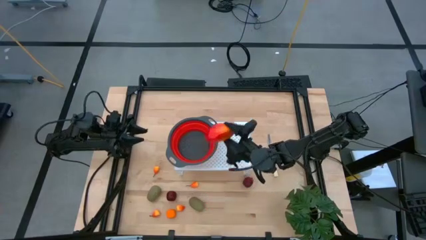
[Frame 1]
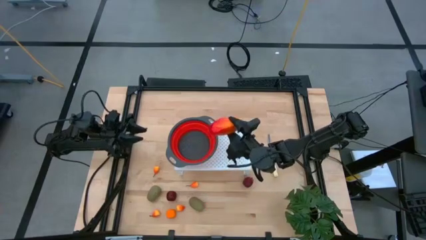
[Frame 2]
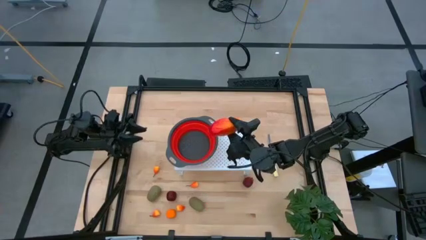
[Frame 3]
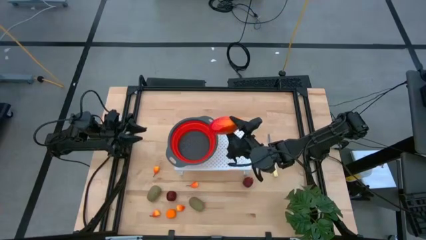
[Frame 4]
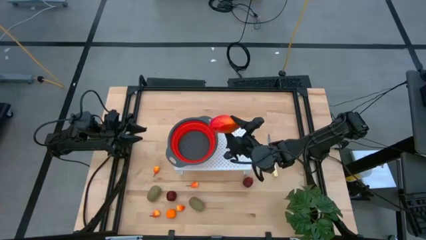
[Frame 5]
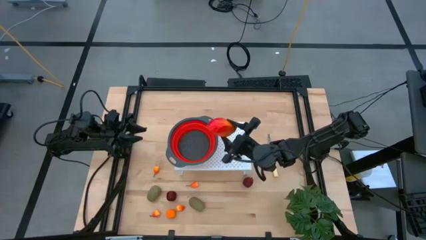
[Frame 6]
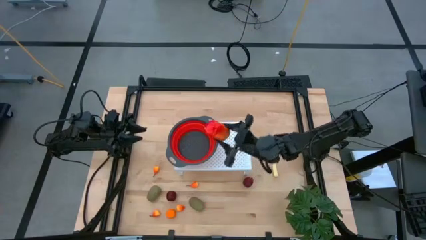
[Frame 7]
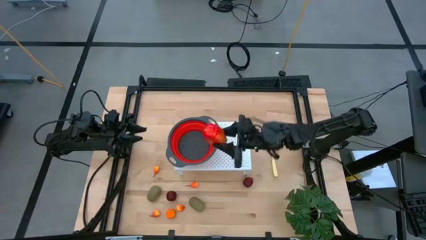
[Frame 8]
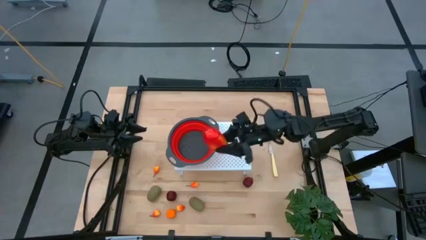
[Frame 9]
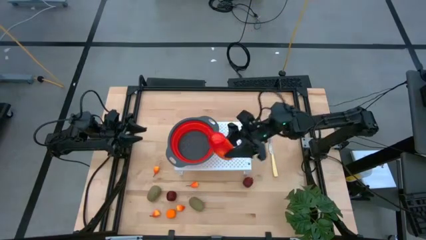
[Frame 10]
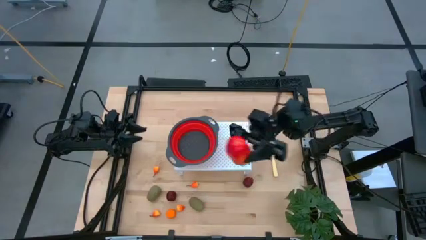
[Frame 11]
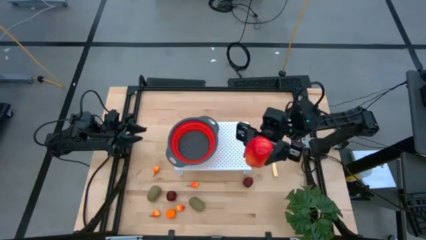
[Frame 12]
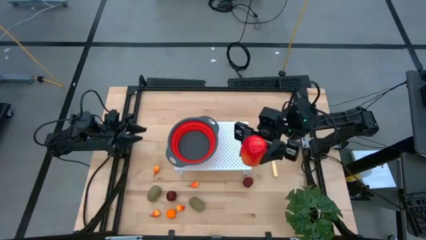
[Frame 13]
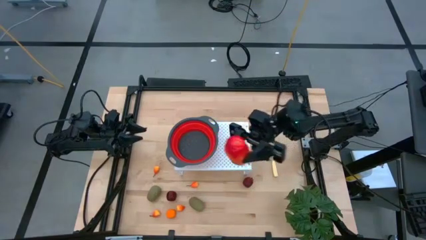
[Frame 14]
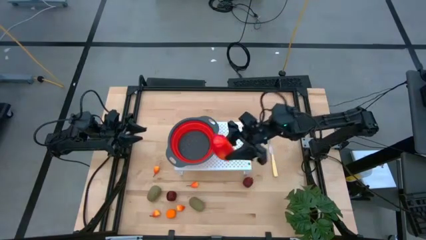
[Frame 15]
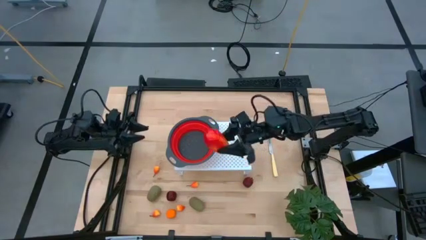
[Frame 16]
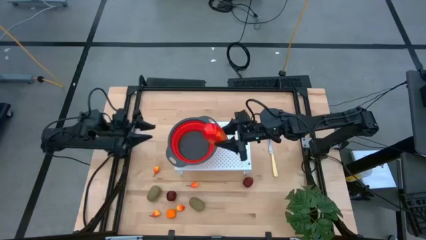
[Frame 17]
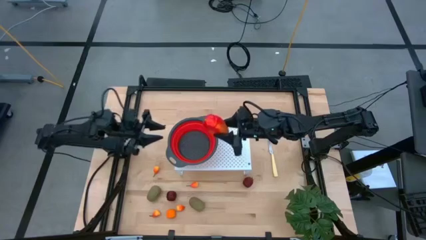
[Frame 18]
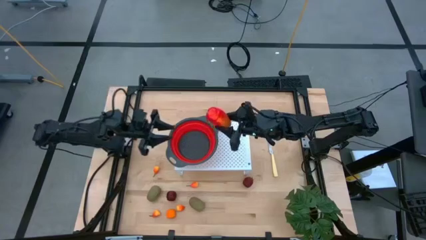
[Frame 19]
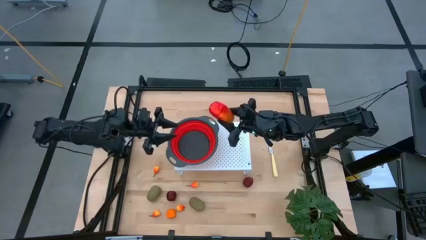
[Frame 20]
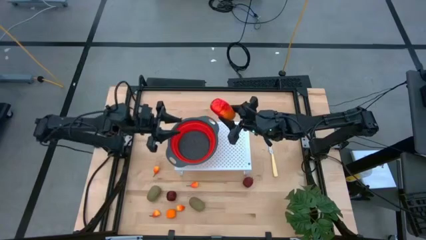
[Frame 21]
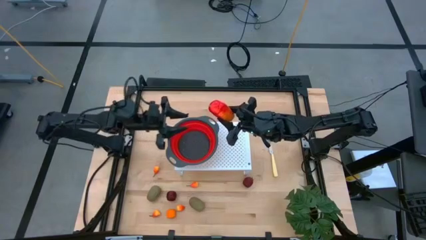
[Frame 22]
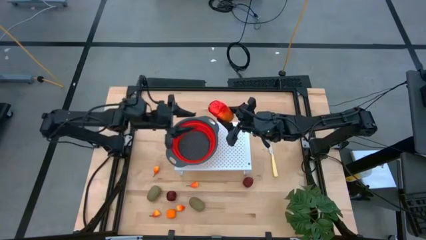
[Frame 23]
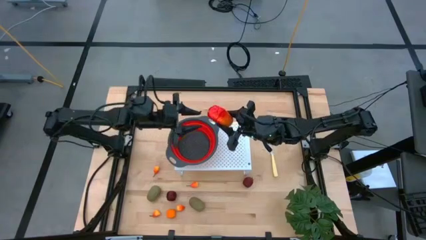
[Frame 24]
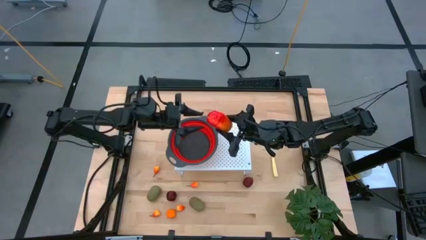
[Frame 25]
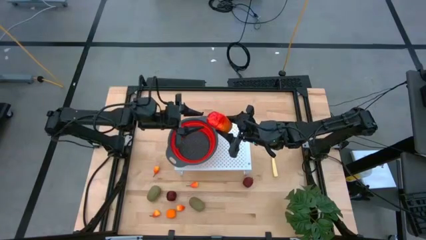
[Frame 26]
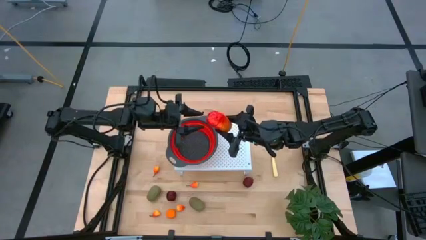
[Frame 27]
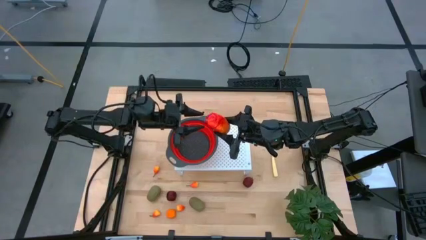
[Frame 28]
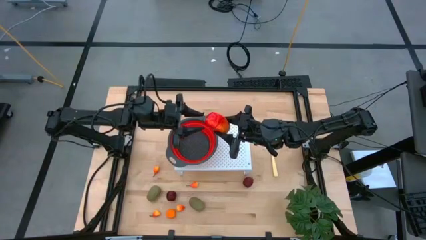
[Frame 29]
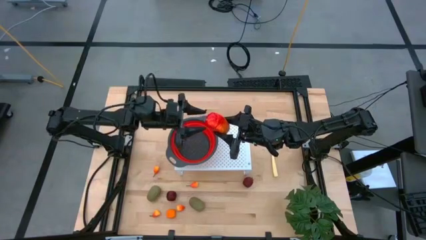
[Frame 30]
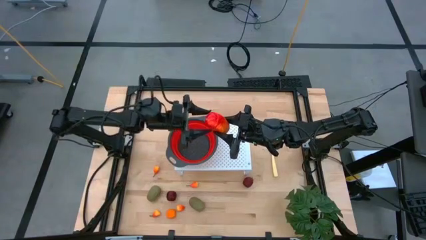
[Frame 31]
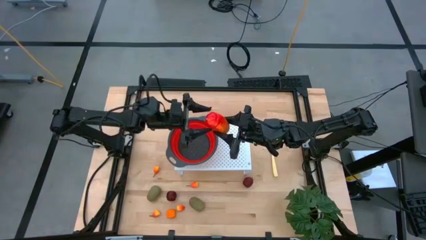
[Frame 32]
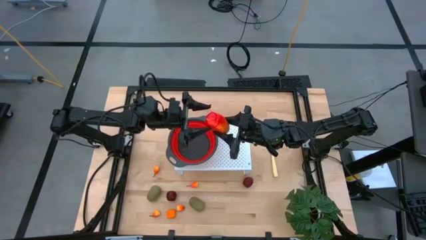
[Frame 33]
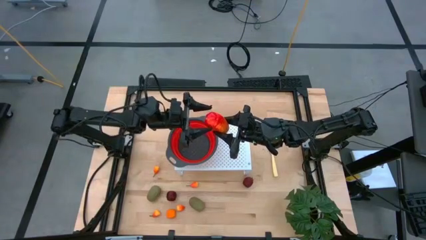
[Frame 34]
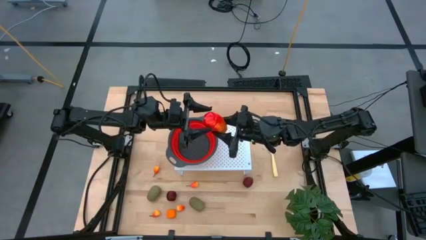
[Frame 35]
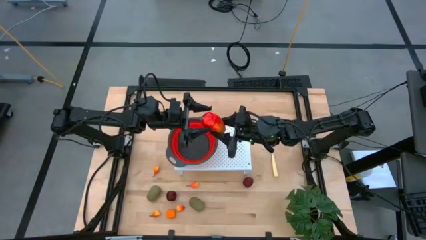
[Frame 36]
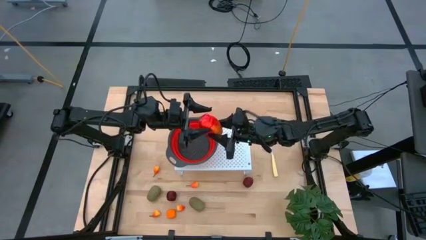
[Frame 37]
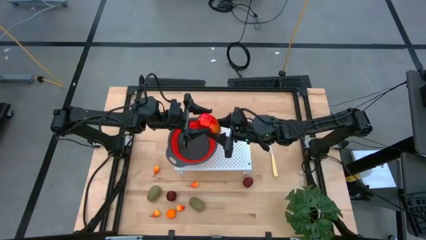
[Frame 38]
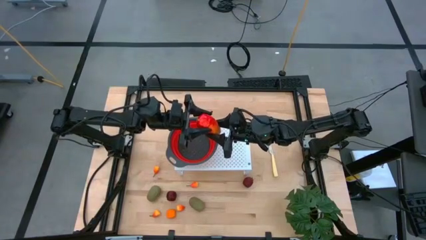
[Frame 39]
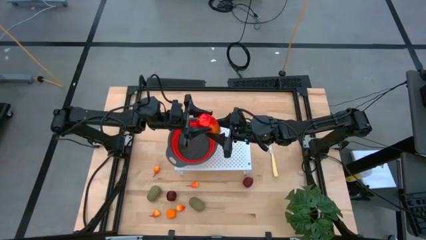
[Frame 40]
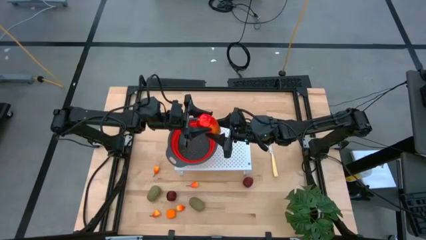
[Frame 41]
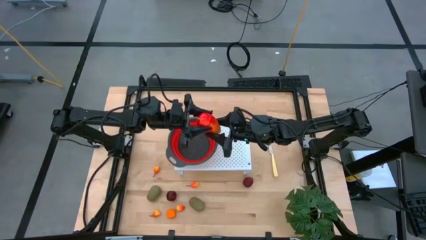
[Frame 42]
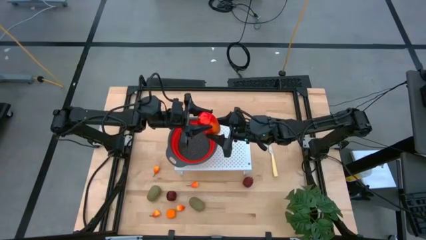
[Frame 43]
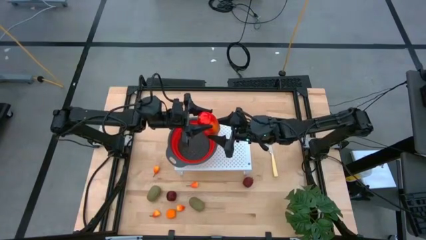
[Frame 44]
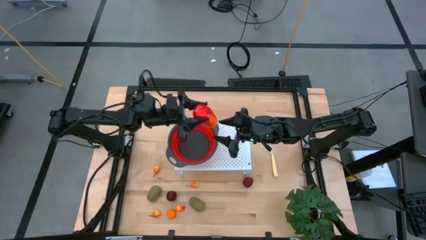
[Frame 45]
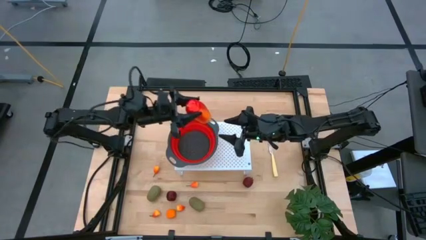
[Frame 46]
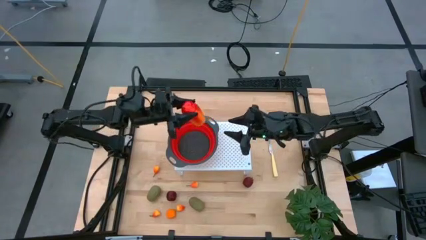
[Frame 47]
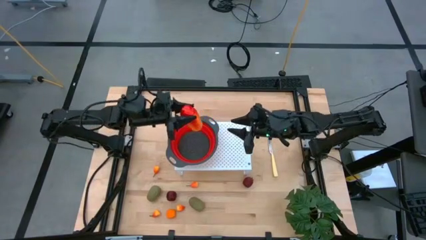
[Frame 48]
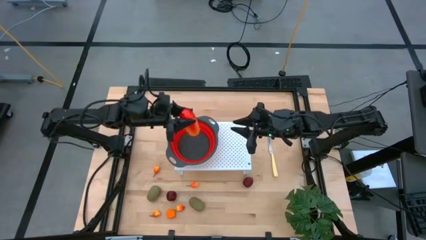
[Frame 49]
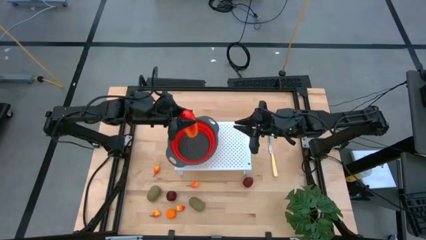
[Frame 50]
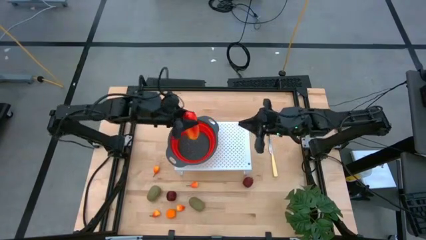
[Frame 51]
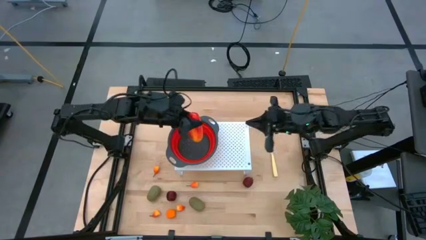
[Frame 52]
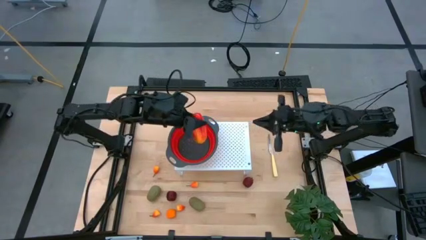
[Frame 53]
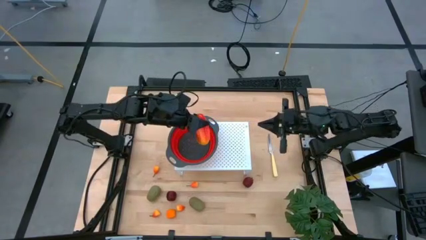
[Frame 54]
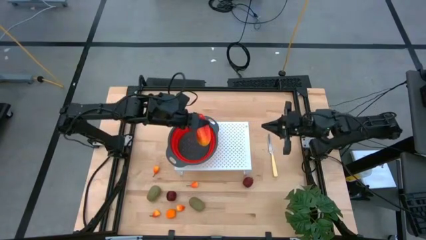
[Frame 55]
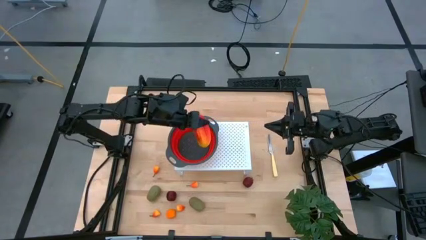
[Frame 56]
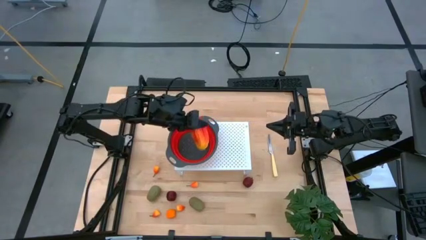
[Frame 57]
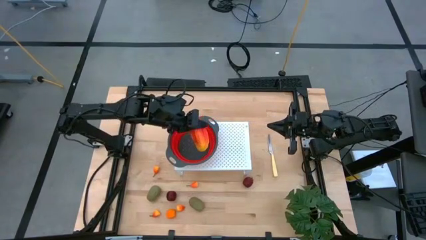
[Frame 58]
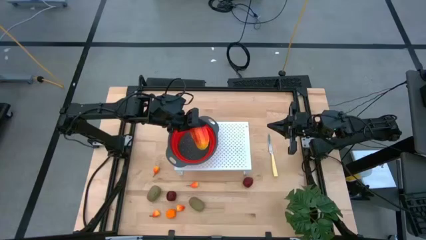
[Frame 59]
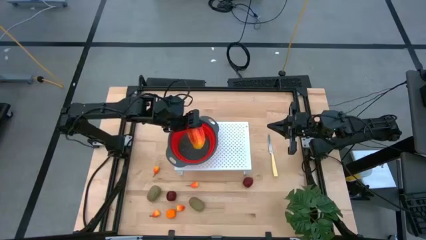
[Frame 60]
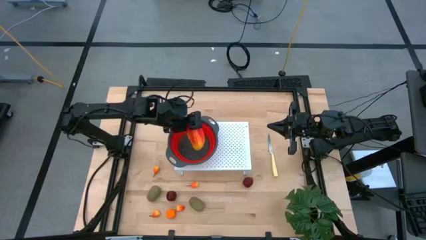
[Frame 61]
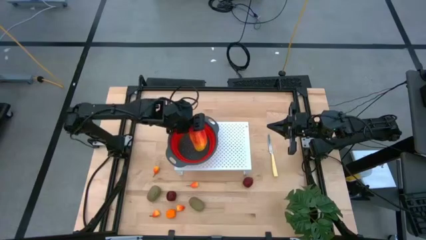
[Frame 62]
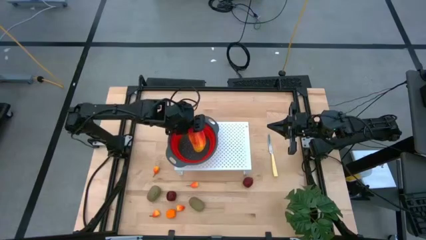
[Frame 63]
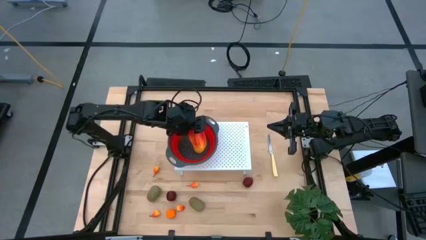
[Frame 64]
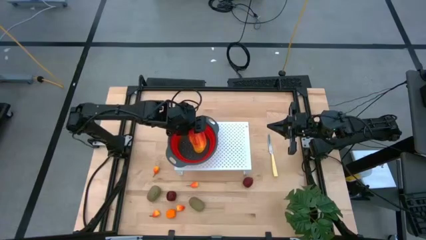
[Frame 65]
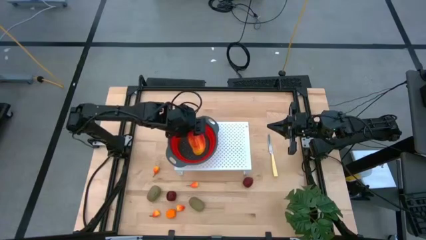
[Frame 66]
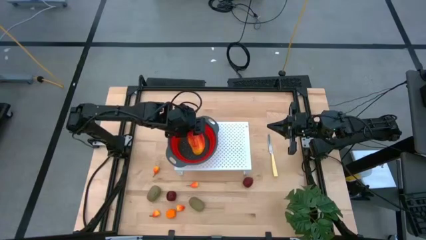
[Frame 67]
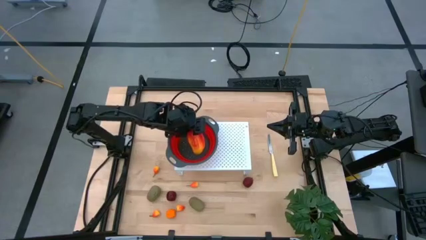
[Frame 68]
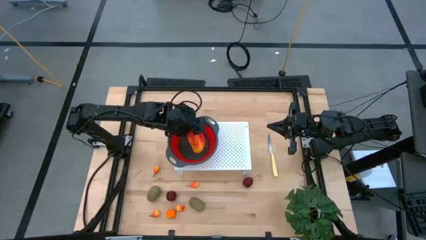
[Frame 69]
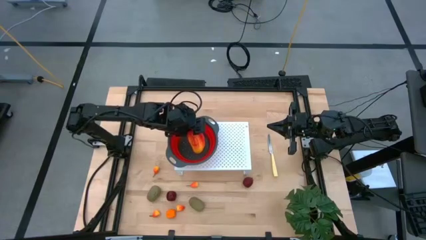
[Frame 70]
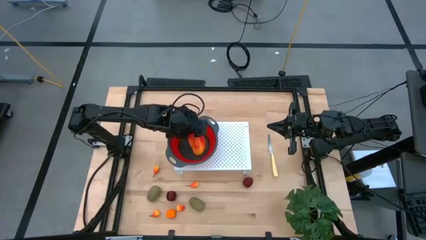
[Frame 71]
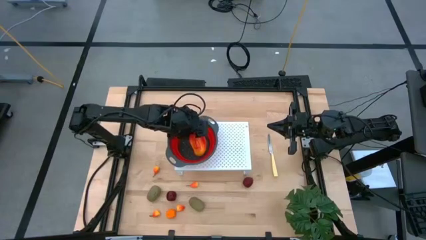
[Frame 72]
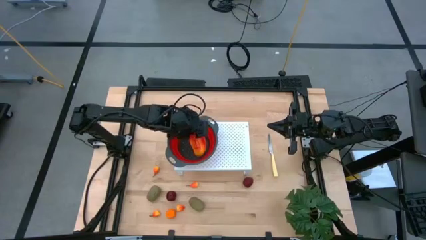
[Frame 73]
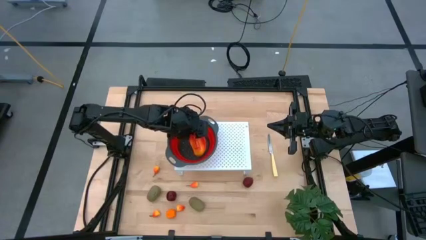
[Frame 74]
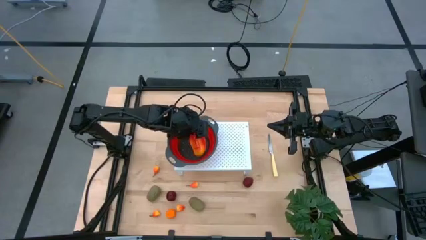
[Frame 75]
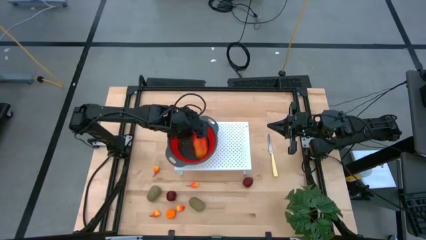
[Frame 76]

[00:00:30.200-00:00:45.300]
Task: Pick & Place Fruit
Put the orange mango into the red strainer bowl on the shelf
